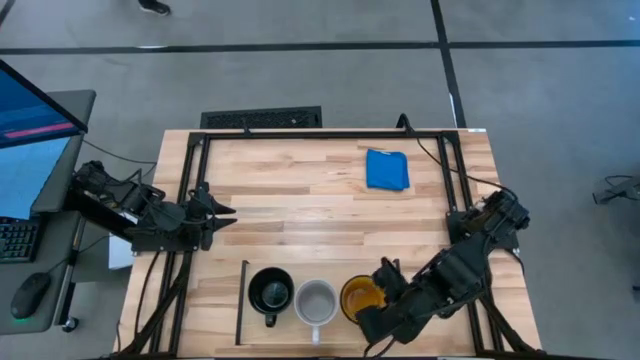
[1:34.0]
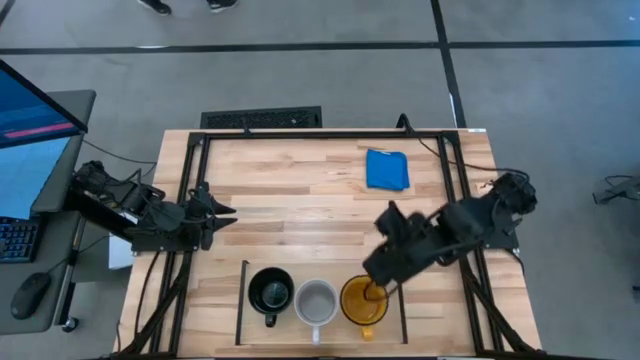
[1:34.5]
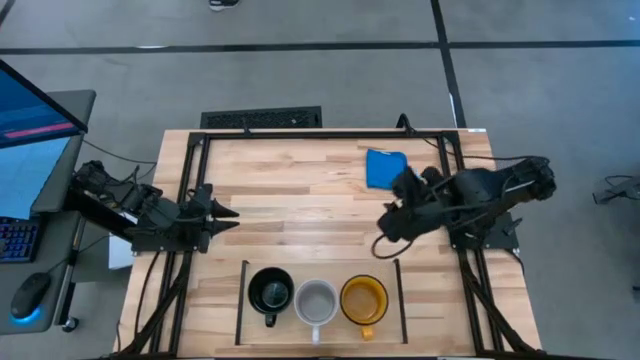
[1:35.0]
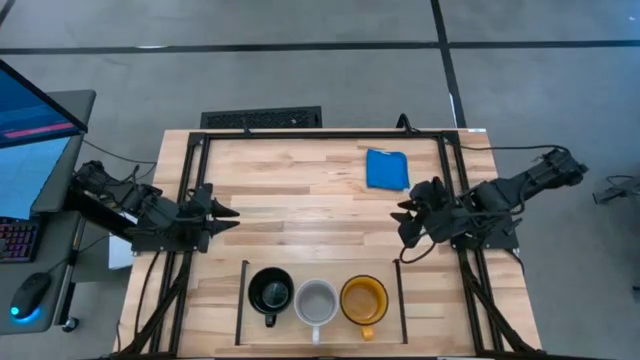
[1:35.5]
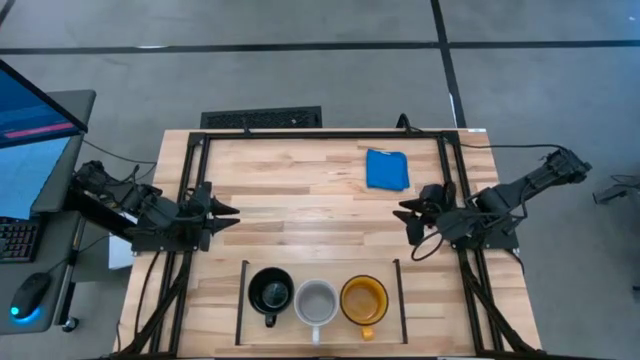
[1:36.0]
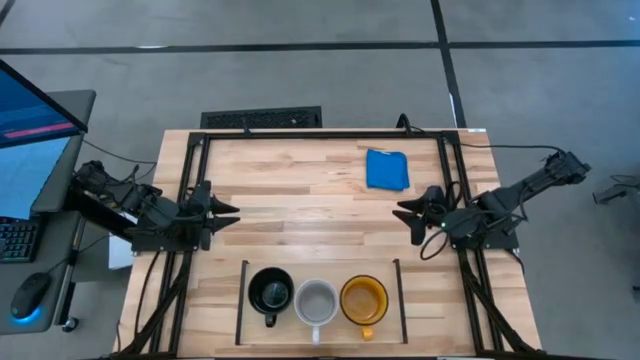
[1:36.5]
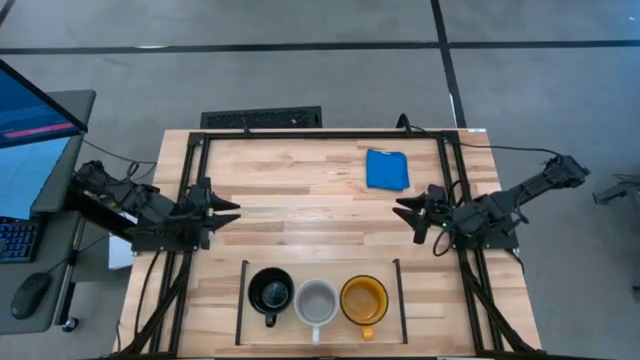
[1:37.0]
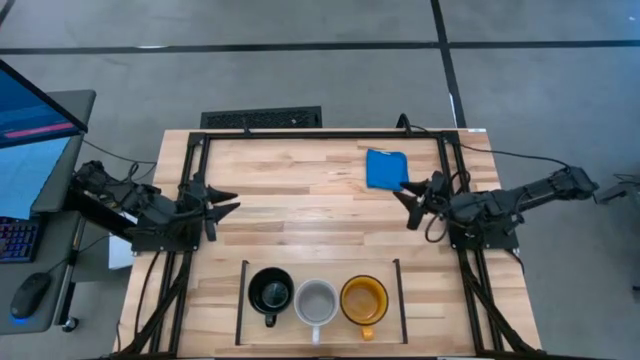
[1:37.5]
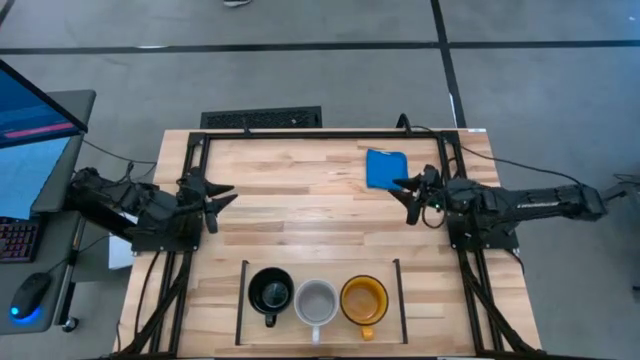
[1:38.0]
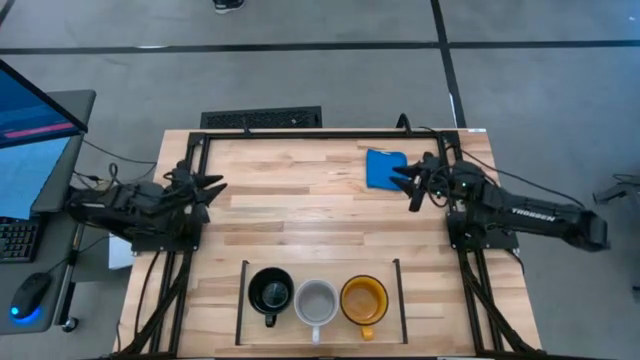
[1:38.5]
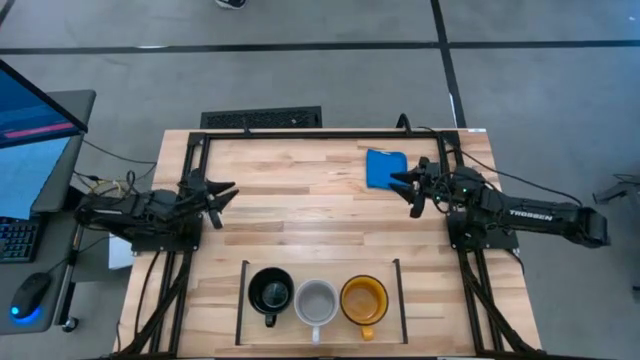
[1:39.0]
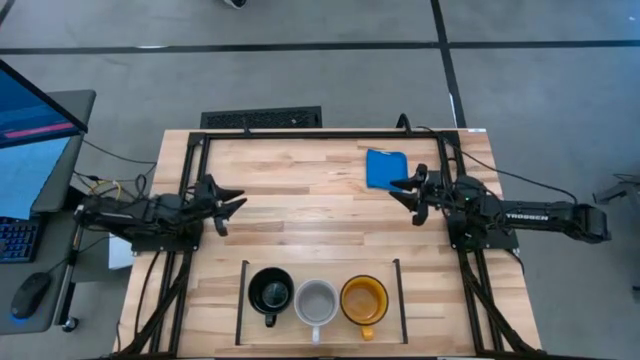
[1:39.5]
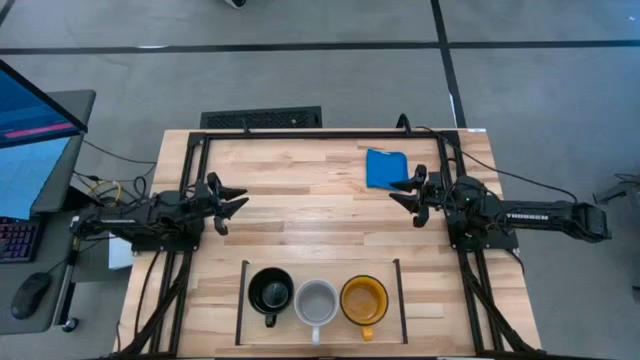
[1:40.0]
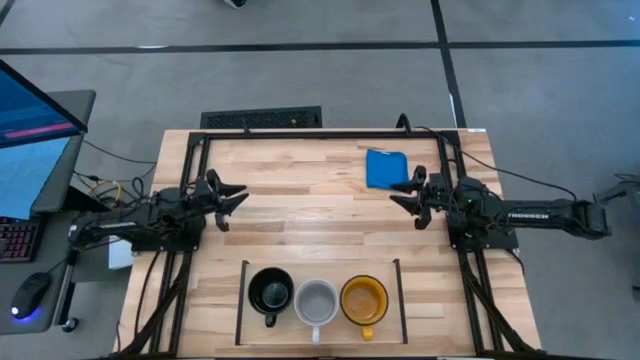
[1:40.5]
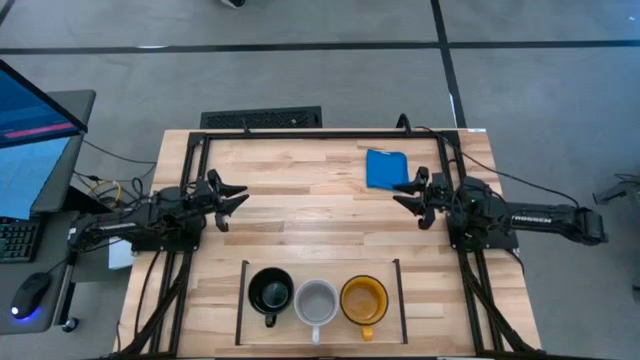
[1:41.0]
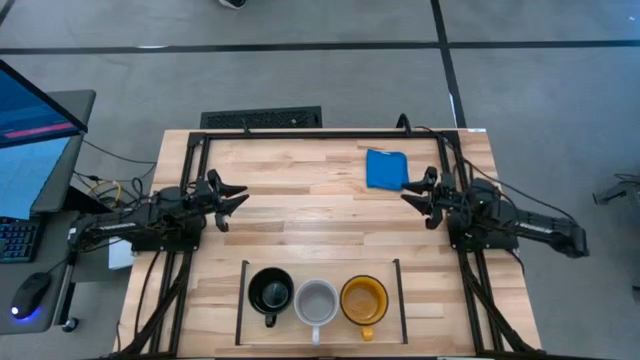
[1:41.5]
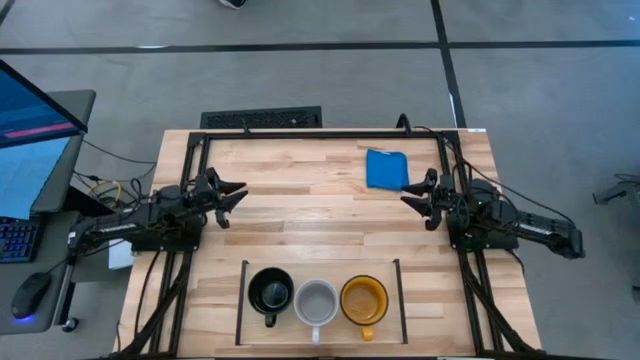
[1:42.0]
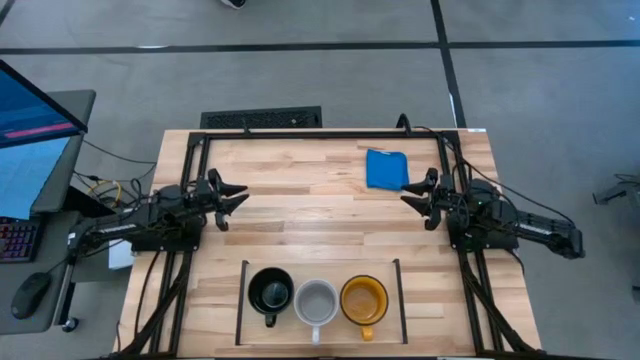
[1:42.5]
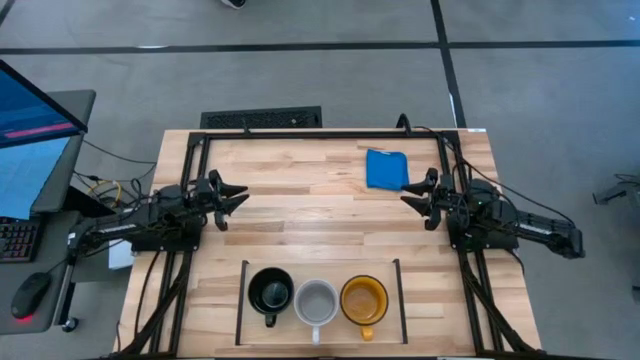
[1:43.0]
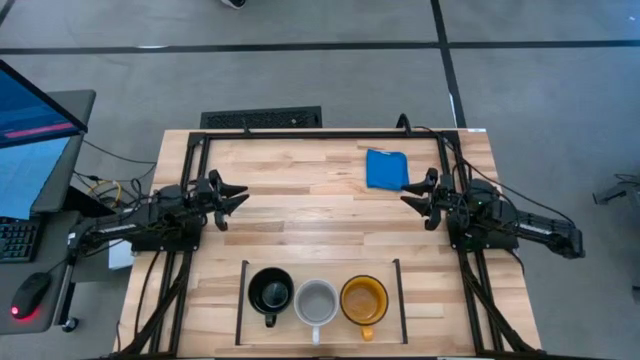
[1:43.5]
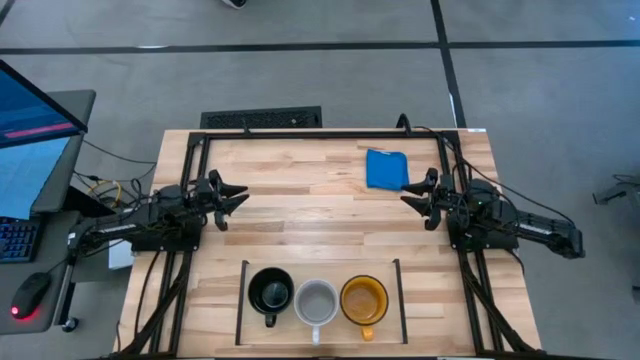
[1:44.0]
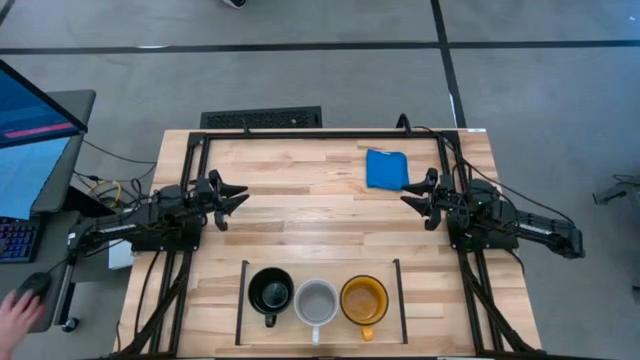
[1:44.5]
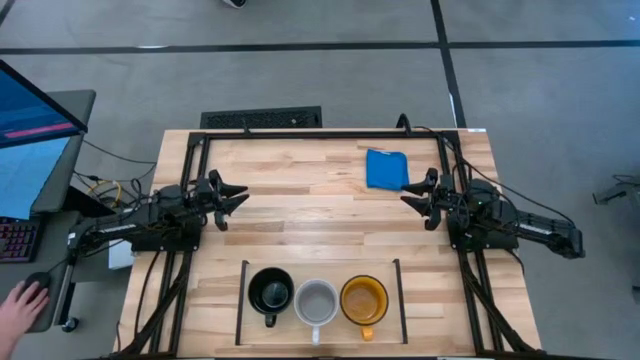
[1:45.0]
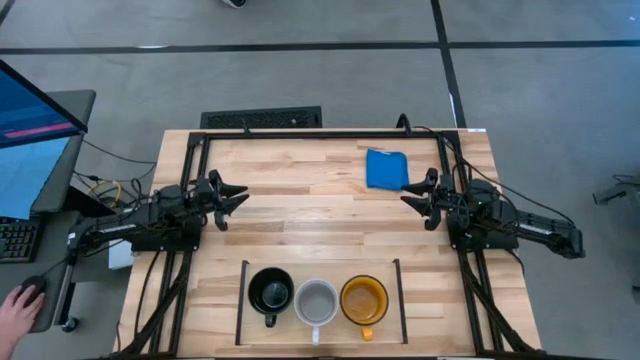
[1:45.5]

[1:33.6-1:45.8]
Task: Stack small to large cups/mugs on shelf
Return to Home Position

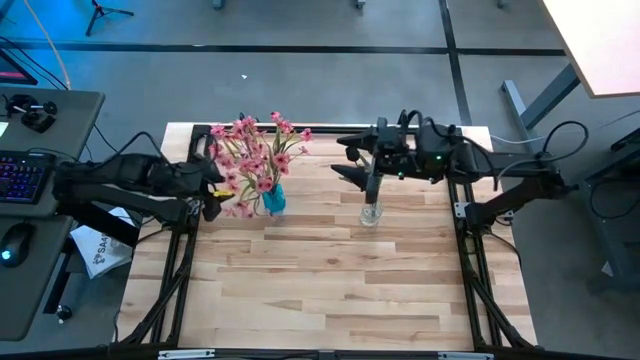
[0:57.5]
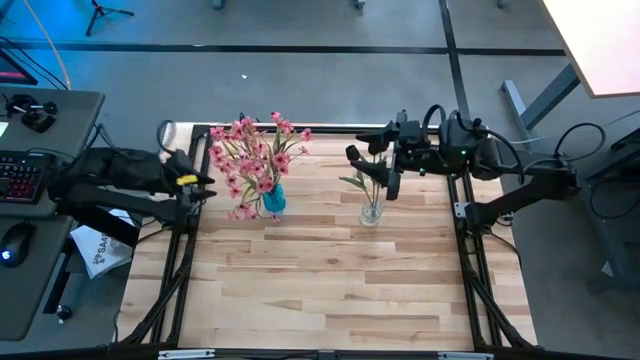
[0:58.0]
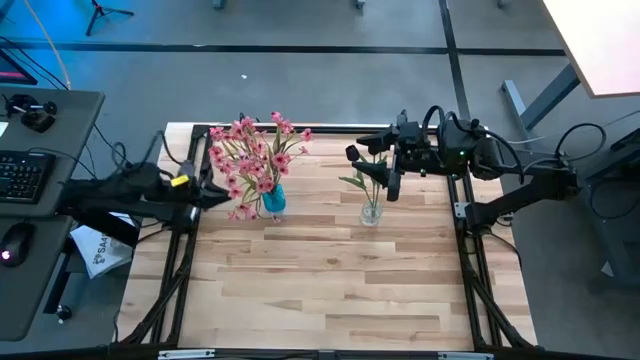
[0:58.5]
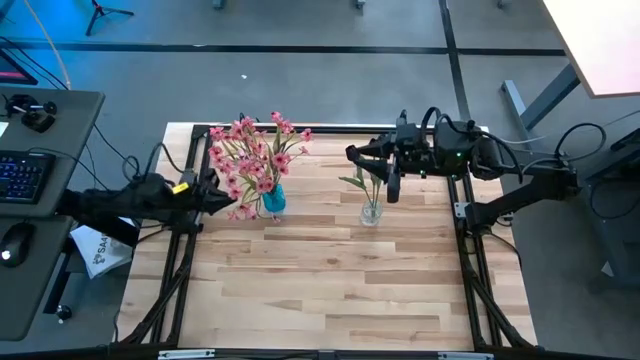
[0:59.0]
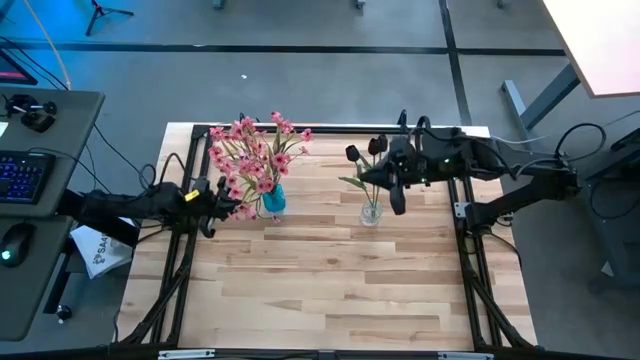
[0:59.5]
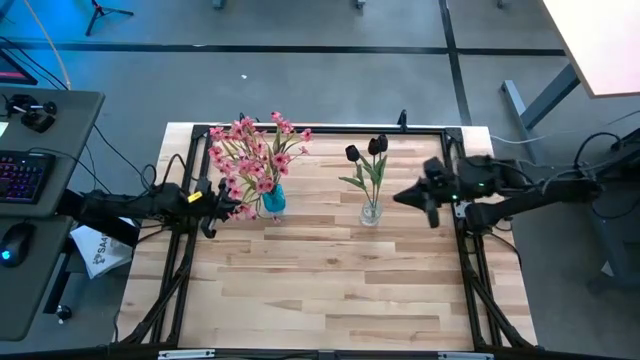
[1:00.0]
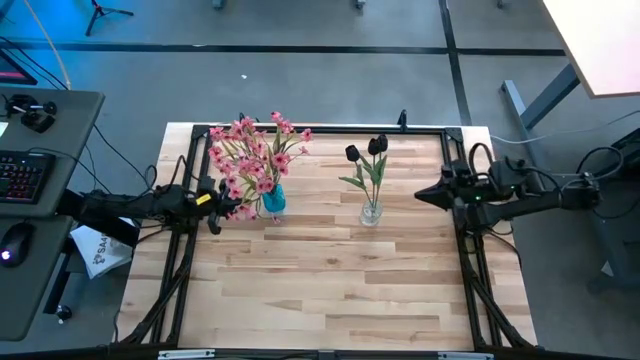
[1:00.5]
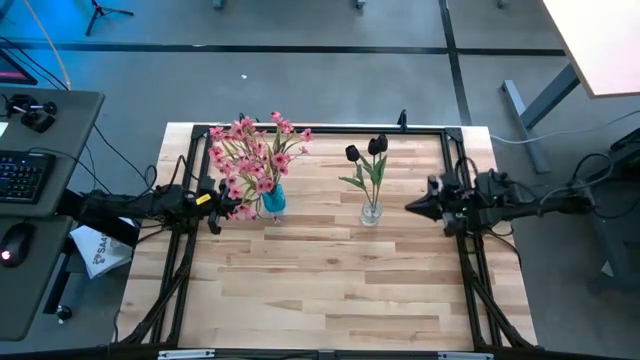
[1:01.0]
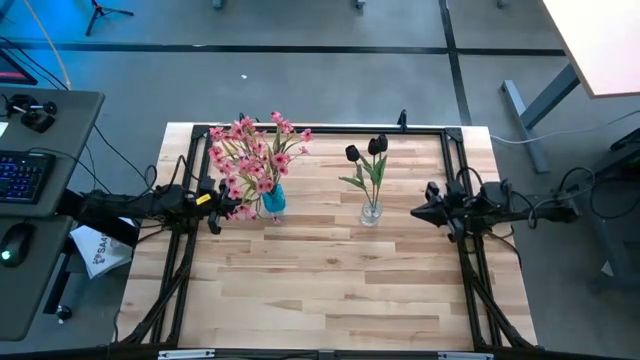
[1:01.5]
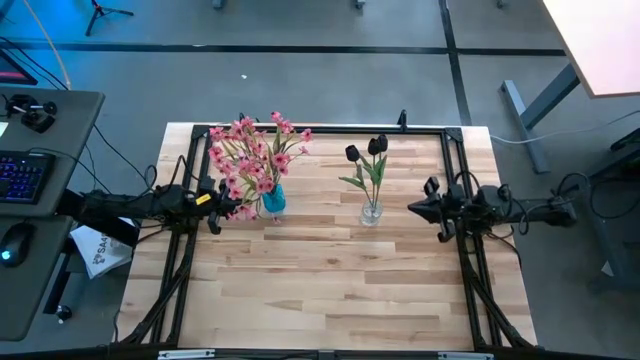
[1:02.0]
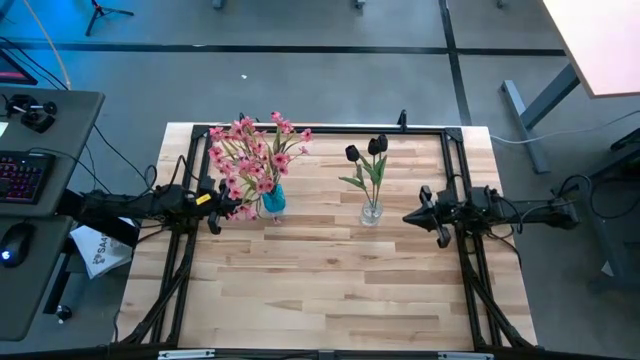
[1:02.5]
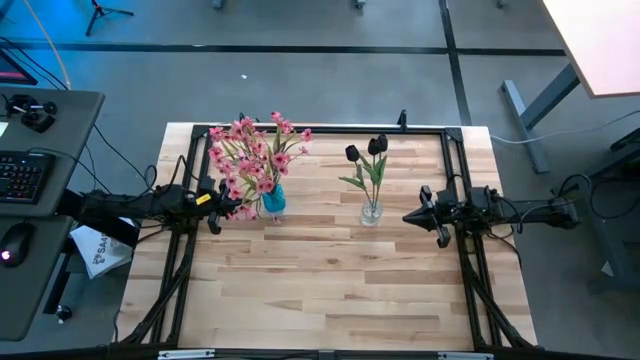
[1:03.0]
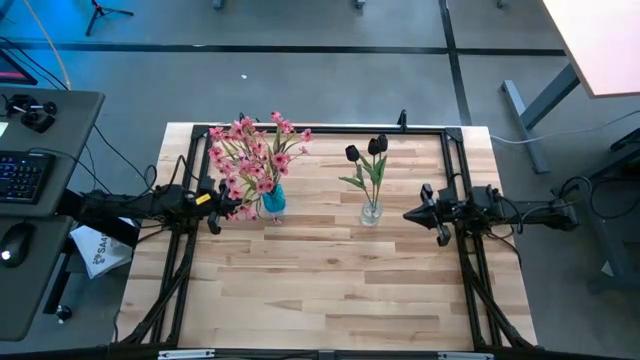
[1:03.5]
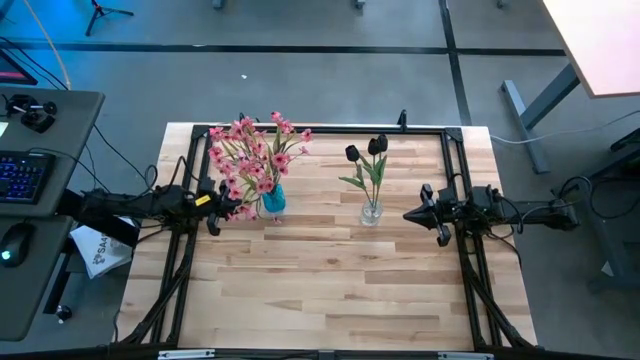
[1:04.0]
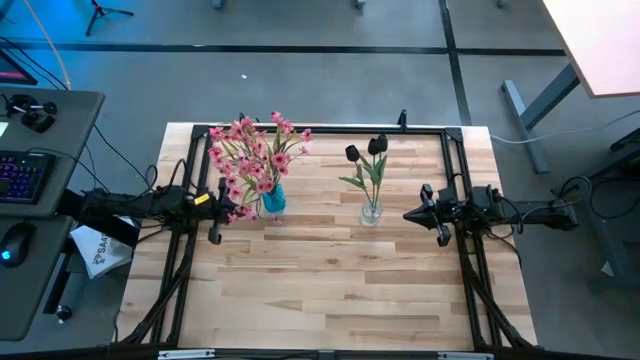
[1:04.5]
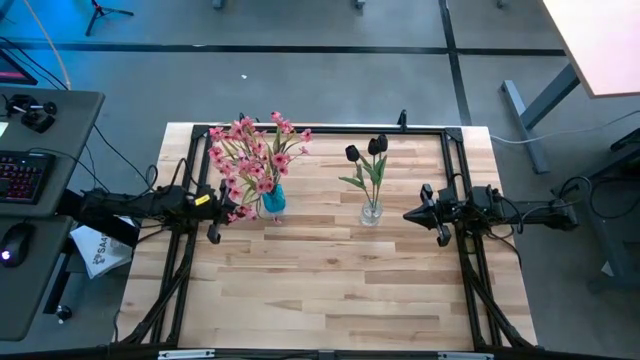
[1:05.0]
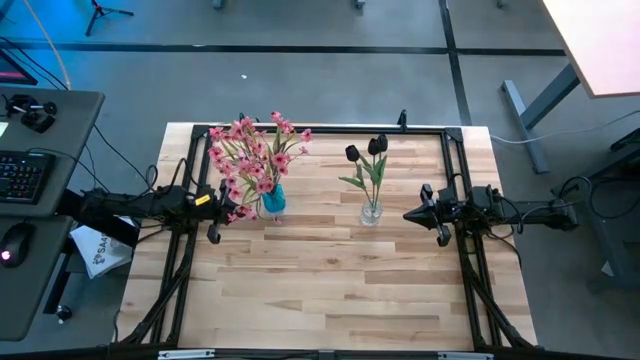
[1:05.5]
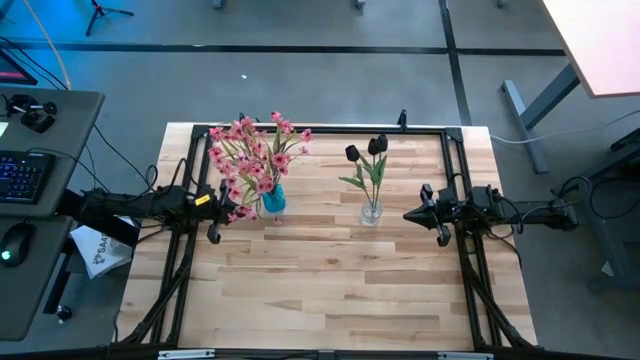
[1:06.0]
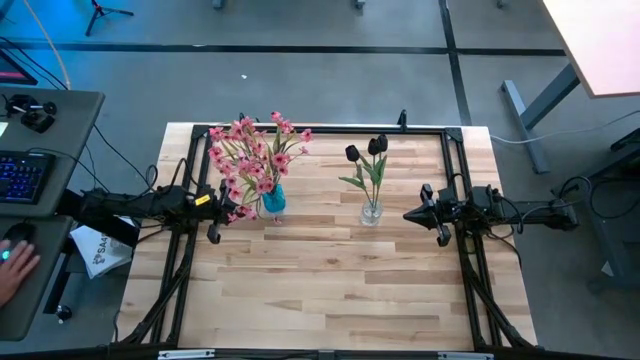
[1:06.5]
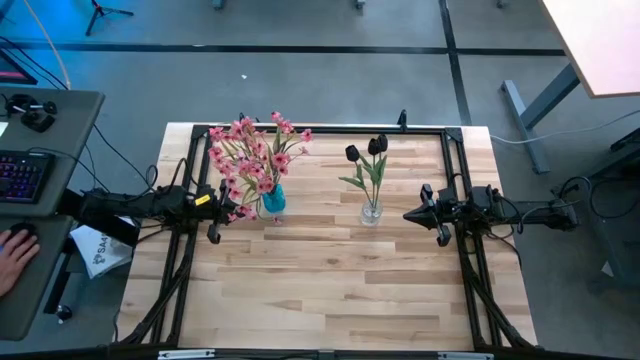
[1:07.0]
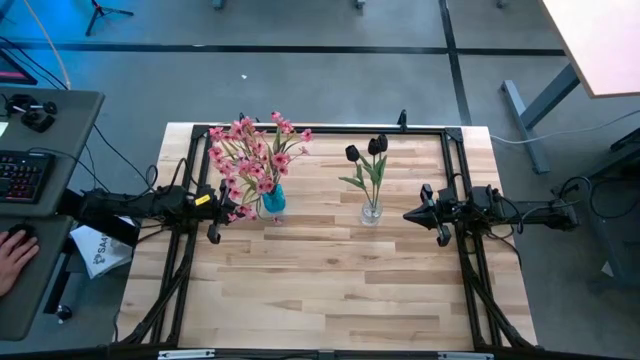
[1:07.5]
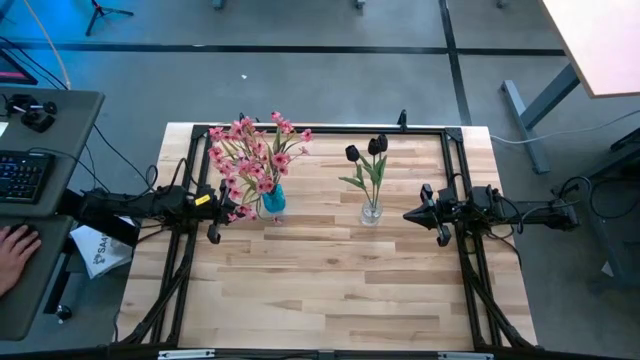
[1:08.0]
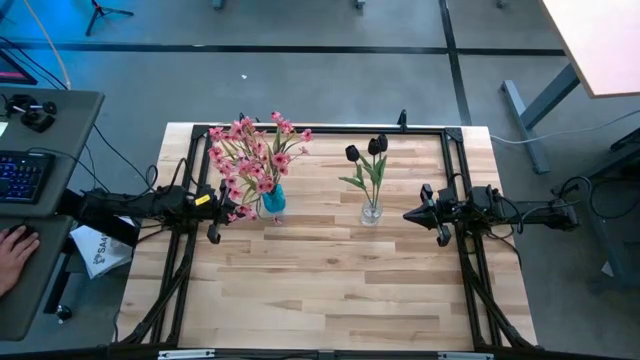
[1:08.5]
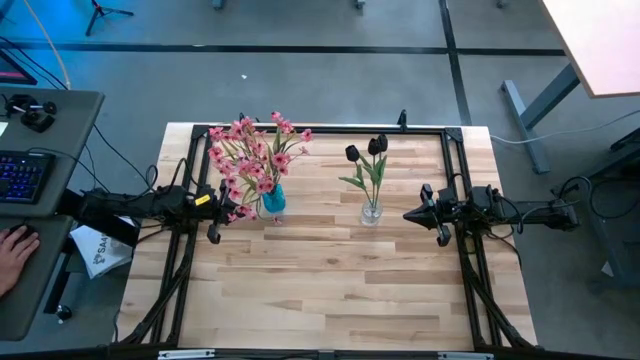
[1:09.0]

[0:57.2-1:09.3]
Task: Sort flowers into vase by color
Return to Home Position
